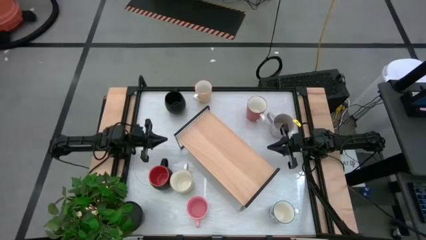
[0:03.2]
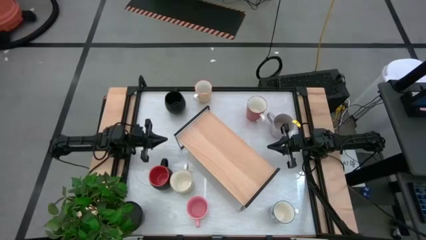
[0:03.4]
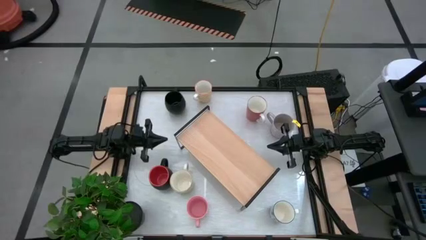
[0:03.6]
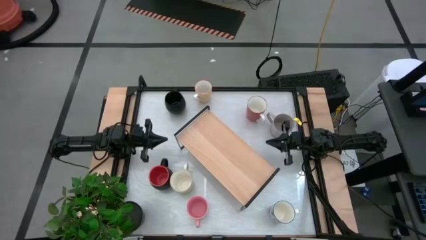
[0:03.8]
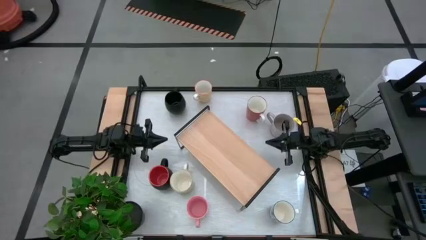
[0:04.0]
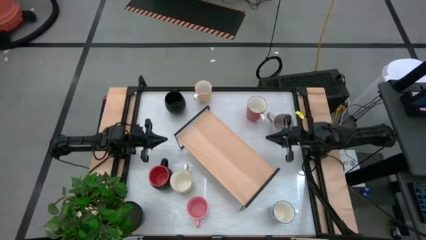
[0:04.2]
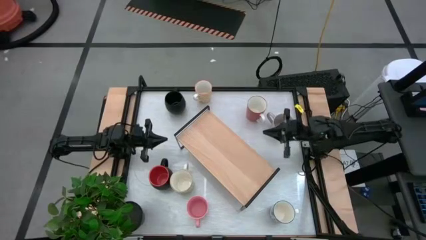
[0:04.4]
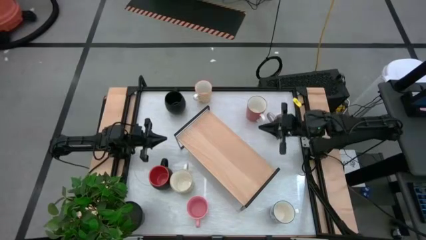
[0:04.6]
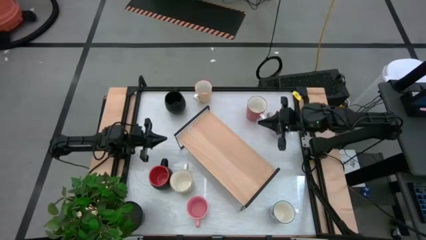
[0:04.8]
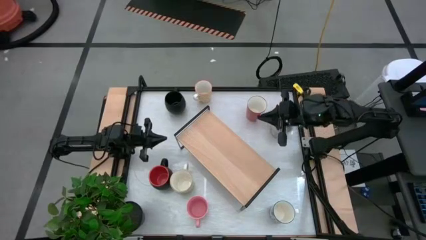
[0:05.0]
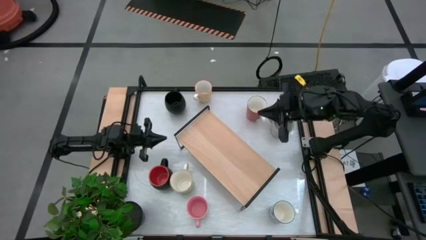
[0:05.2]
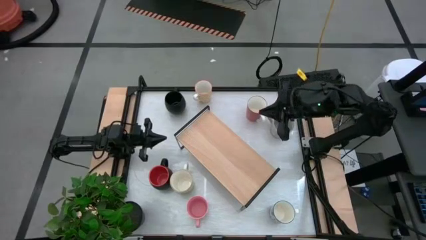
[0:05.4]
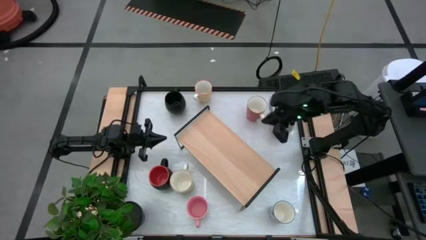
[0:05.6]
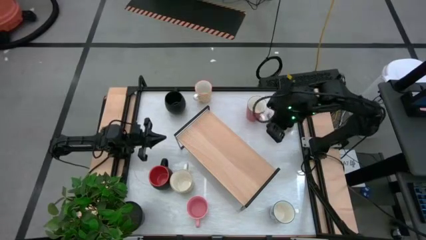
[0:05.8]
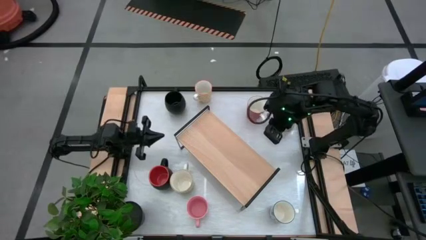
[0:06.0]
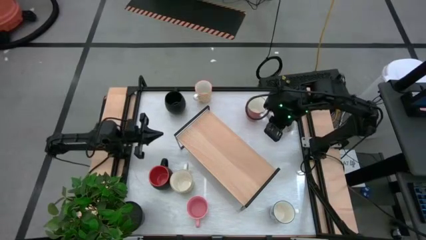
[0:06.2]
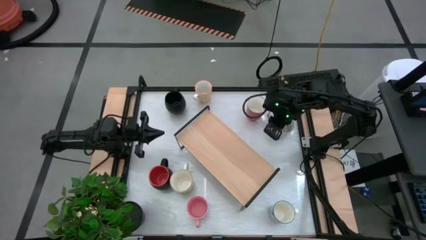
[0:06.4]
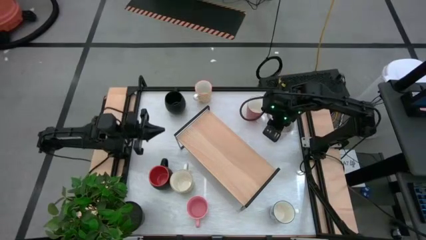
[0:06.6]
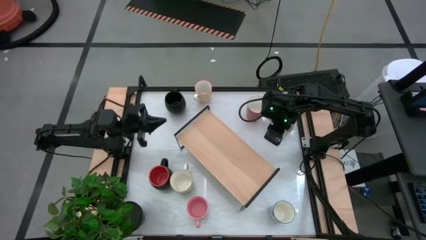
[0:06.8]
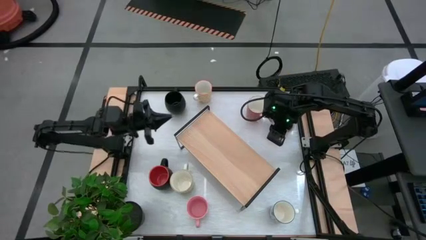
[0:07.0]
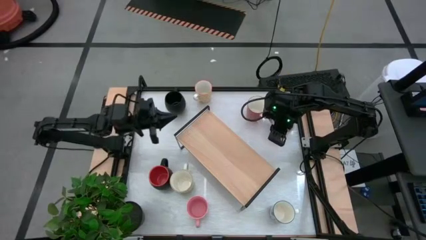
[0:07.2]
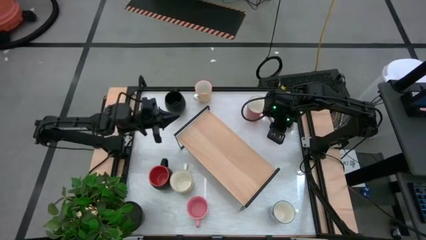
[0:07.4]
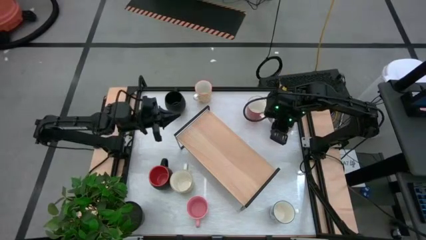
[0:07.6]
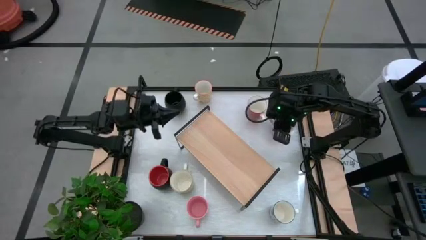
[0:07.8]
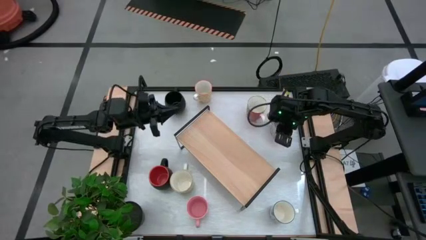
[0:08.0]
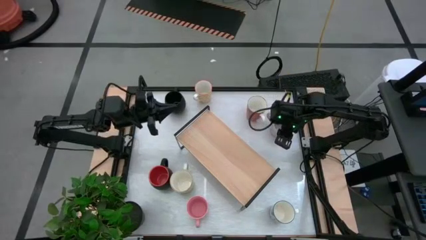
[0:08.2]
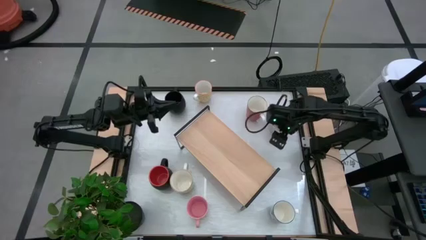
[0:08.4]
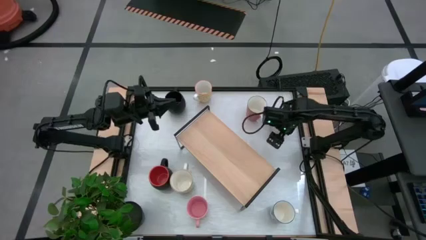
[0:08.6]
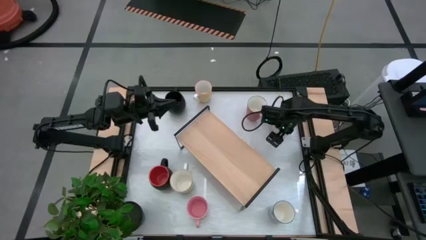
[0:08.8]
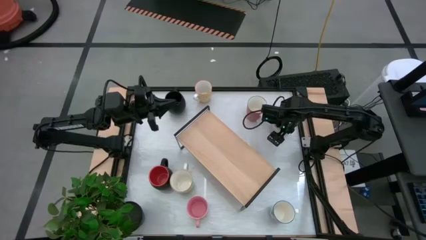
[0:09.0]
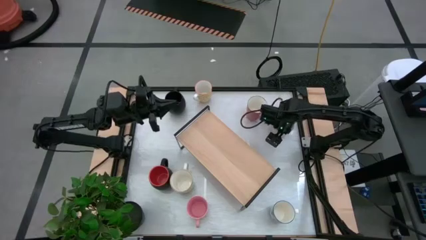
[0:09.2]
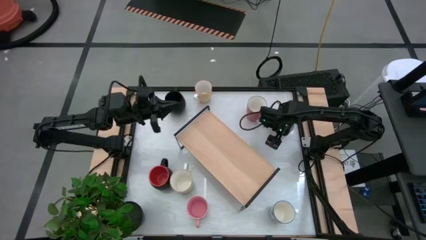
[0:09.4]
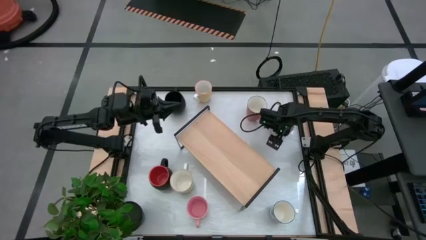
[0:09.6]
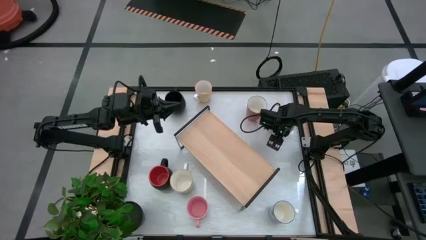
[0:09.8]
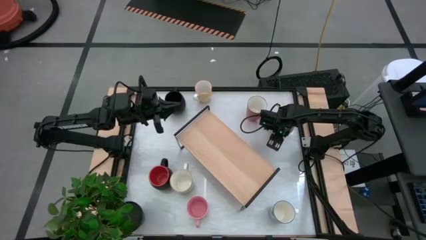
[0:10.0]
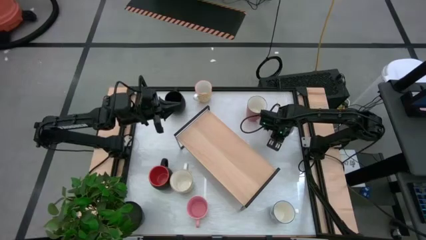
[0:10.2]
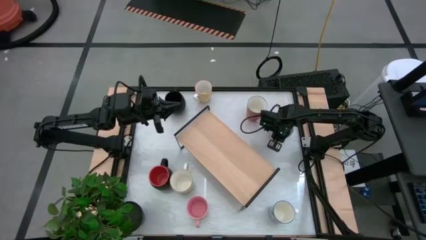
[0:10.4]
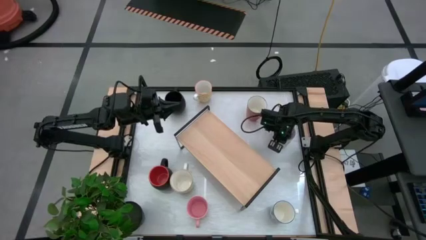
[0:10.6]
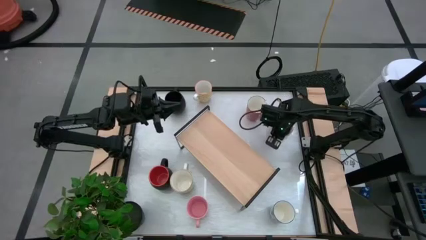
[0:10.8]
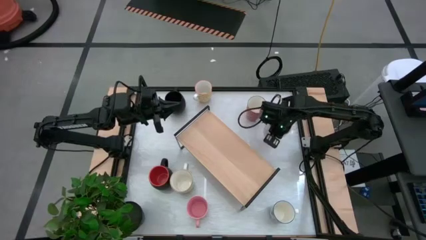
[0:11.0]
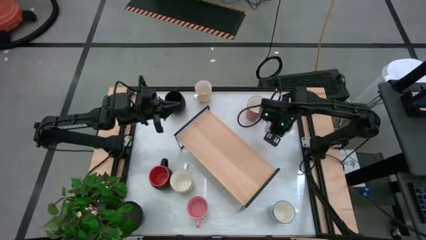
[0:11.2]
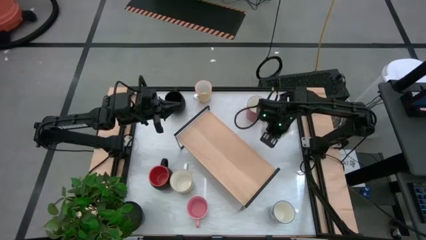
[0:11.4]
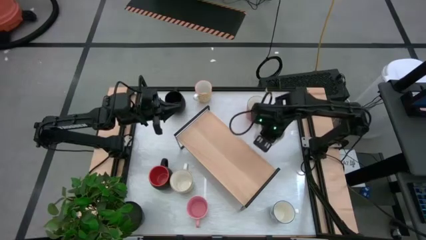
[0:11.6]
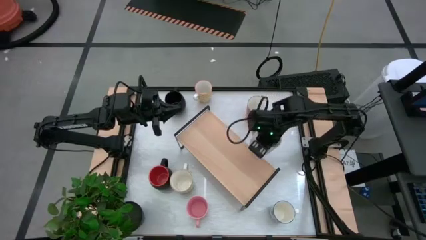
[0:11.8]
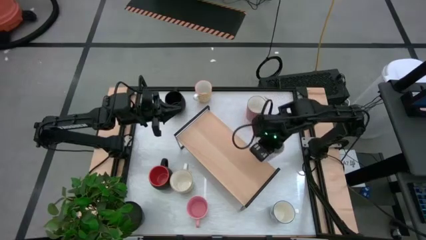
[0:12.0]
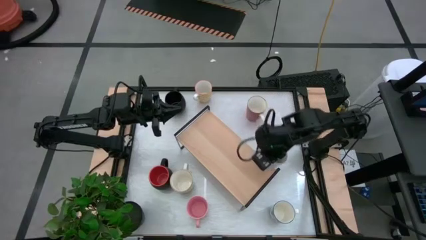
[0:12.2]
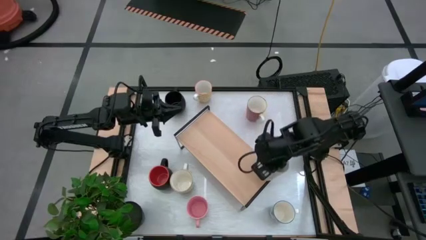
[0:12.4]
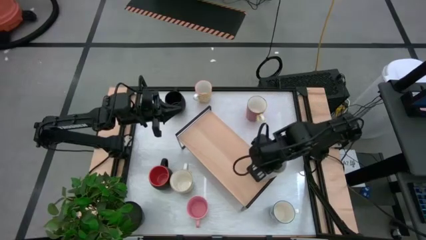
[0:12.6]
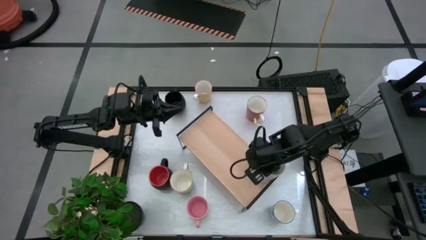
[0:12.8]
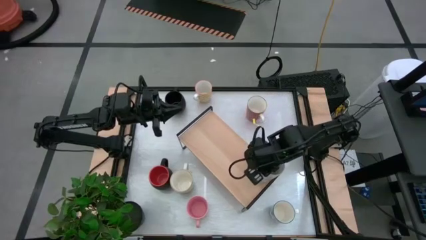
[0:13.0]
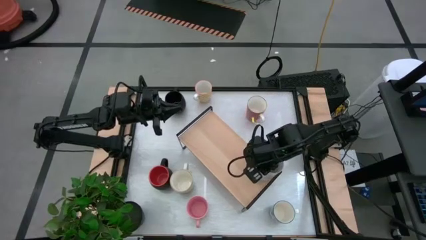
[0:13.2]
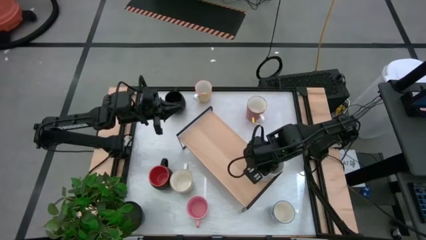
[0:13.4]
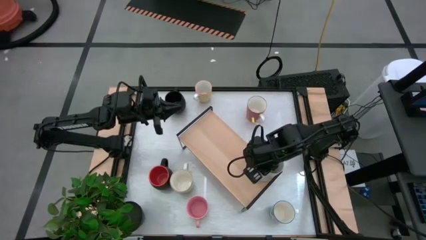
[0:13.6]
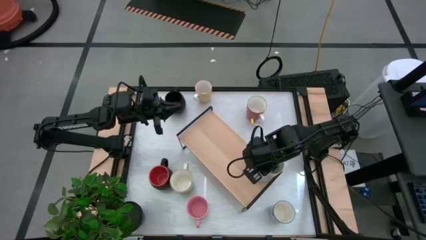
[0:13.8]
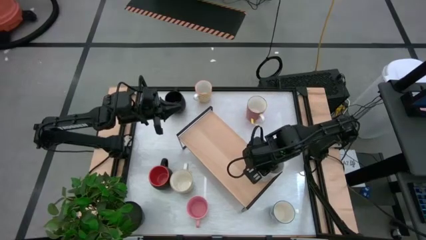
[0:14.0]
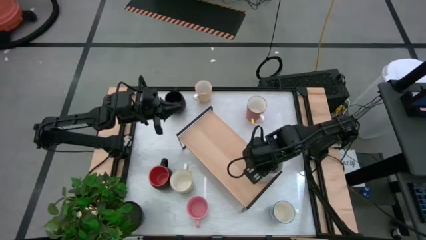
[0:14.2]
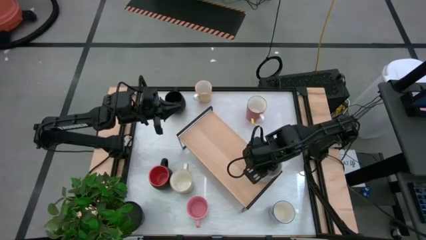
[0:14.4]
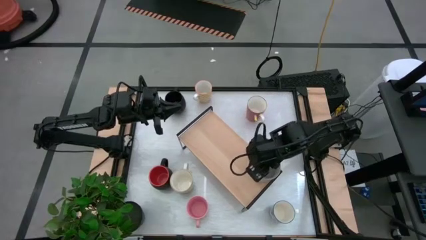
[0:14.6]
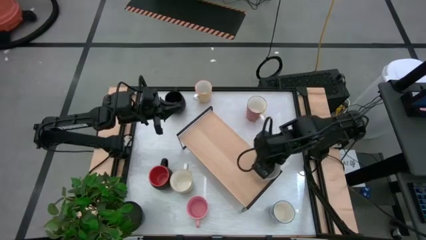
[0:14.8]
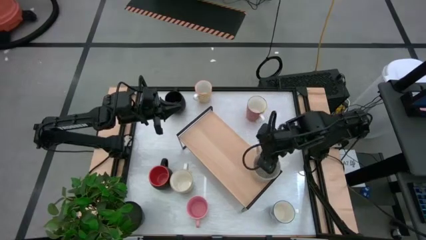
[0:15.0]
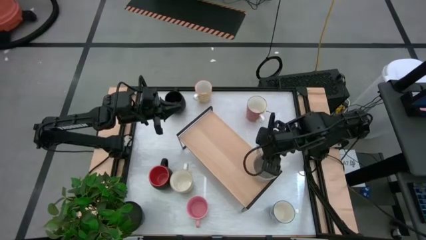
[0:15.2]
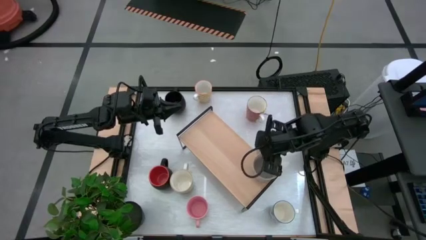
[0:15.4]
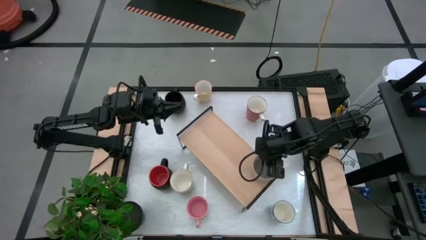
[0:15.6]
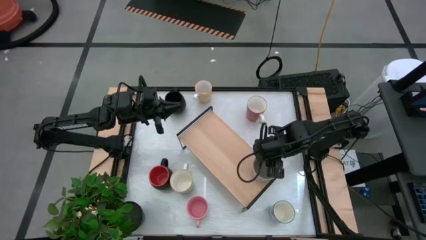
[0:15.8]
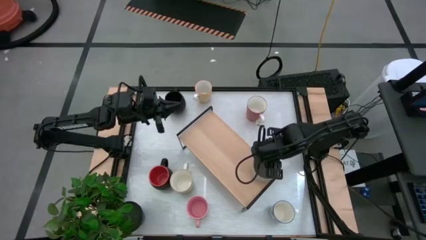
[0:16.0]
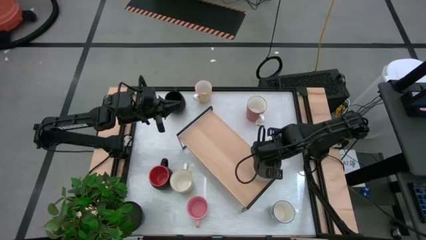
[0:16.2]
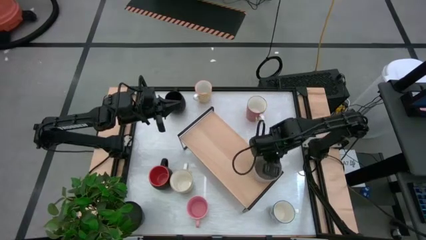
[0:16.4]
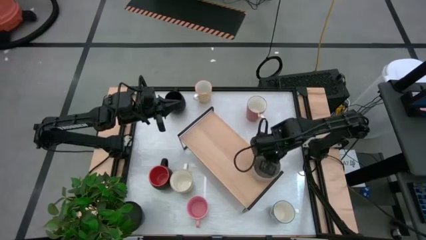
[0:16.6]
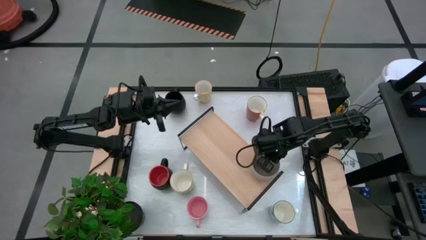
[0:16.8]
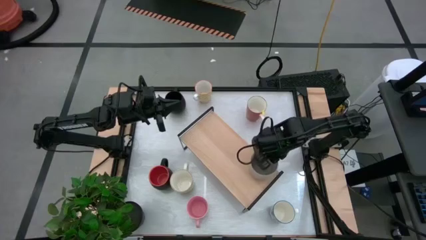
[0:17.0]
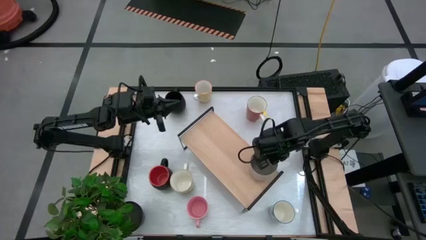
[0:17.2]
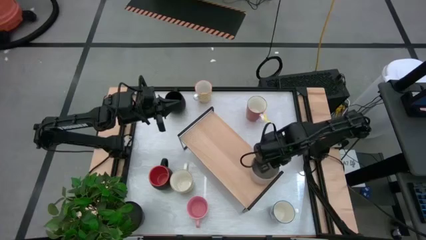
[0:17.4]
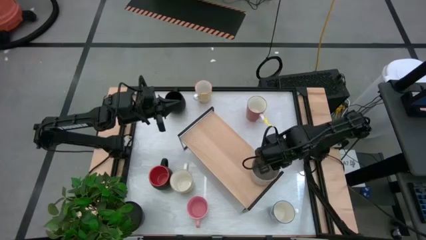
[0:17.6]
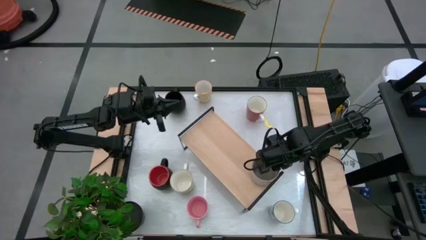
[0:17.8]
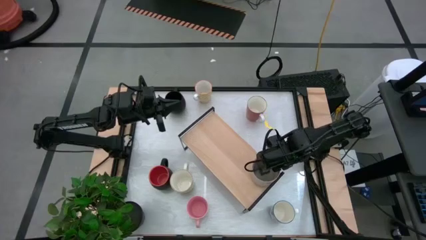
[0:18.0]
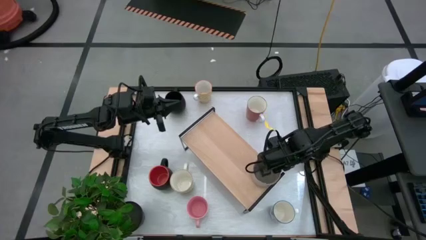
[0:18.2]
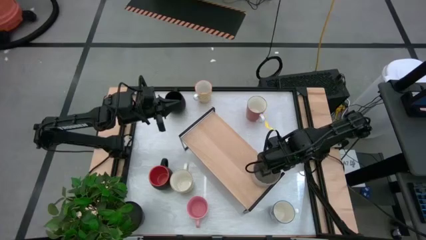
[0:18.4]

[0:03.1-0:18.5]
Task: Place coffee mugs
Put the gray mug on the shelf
